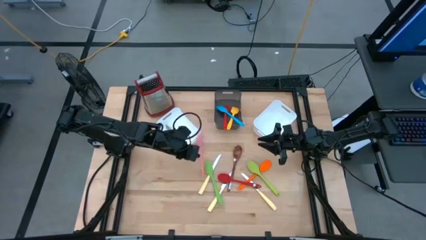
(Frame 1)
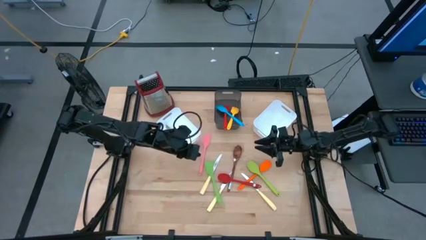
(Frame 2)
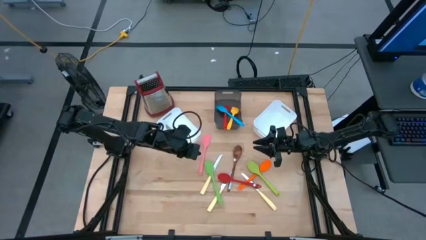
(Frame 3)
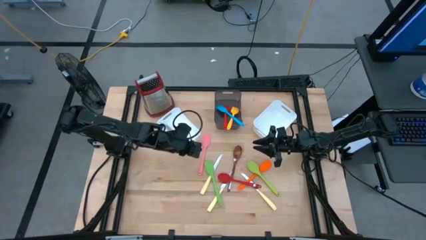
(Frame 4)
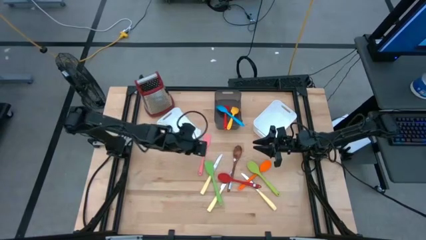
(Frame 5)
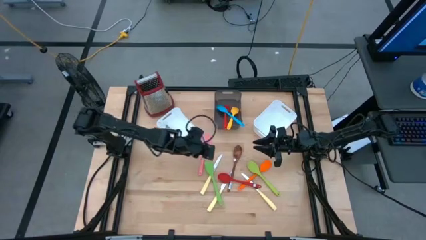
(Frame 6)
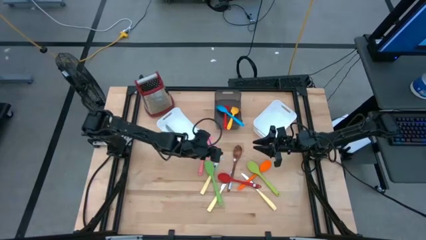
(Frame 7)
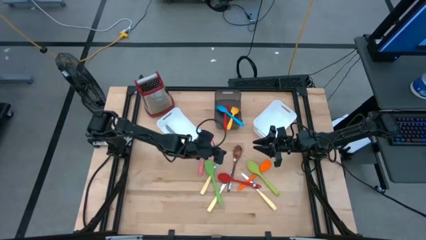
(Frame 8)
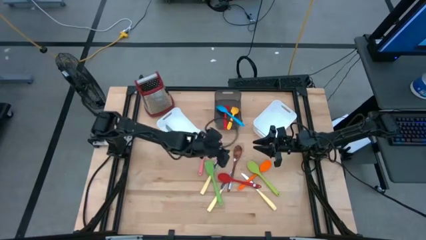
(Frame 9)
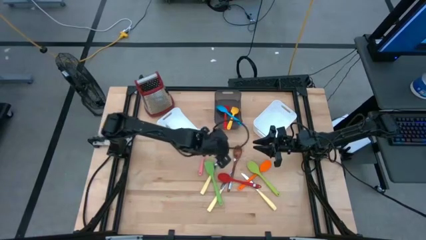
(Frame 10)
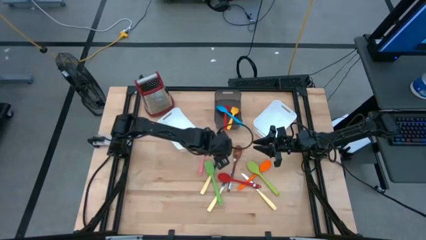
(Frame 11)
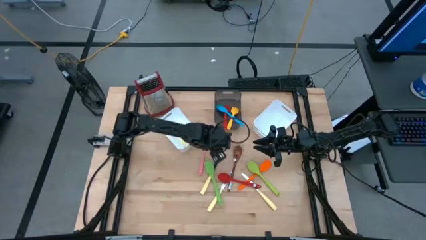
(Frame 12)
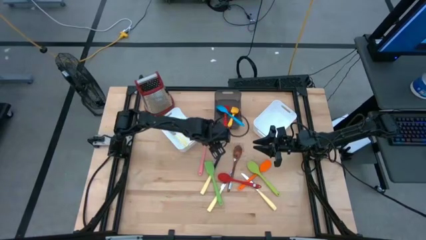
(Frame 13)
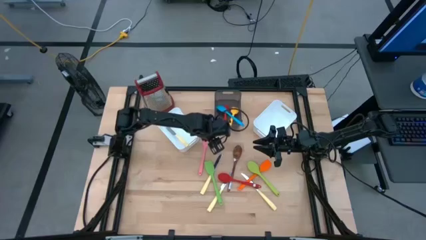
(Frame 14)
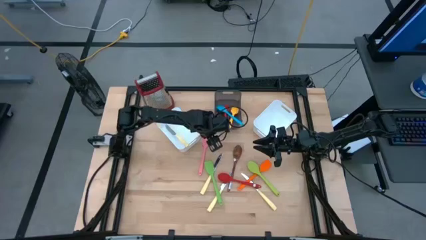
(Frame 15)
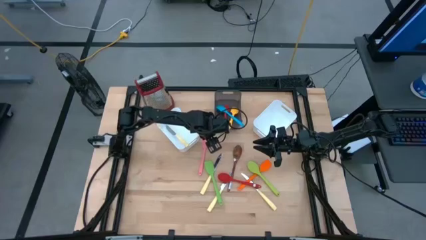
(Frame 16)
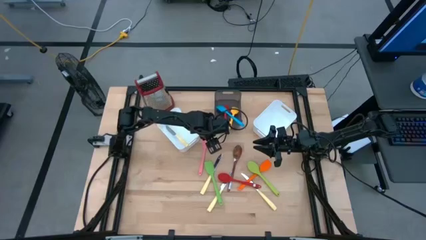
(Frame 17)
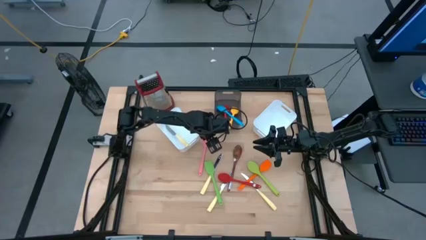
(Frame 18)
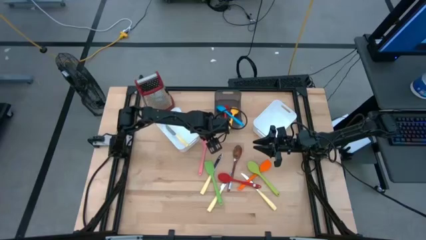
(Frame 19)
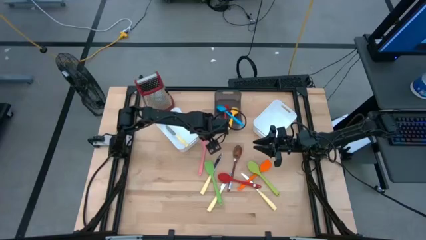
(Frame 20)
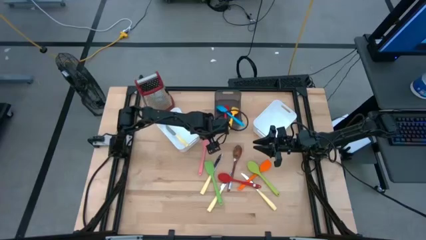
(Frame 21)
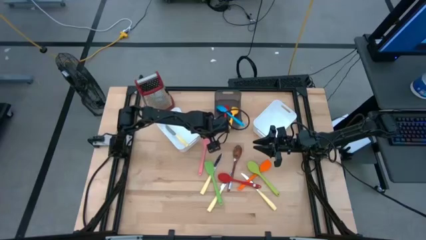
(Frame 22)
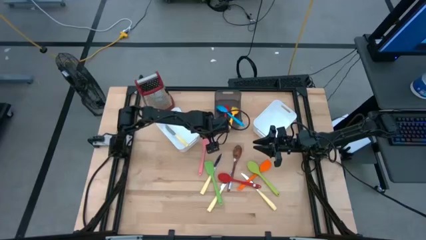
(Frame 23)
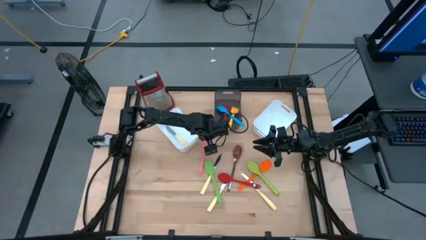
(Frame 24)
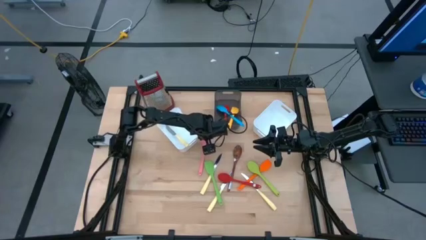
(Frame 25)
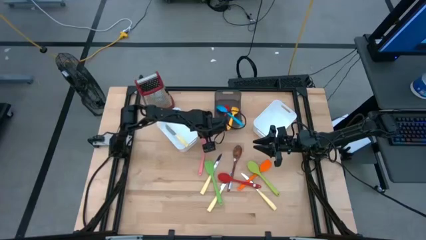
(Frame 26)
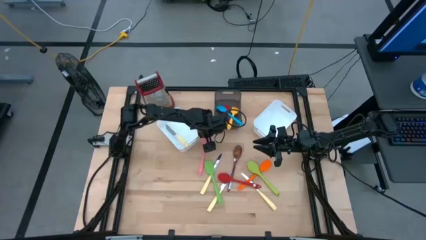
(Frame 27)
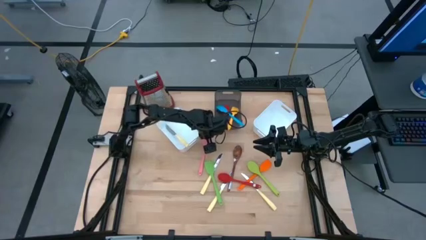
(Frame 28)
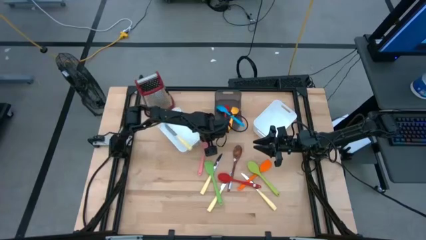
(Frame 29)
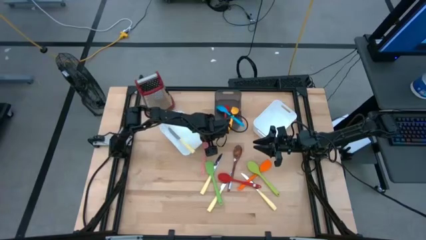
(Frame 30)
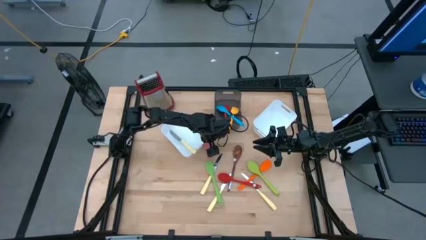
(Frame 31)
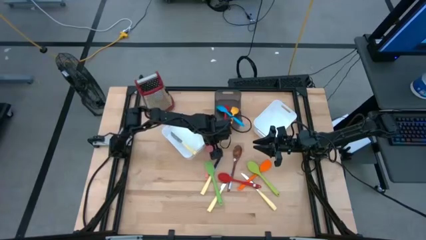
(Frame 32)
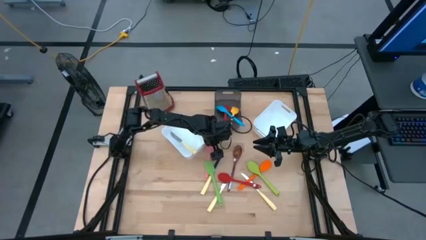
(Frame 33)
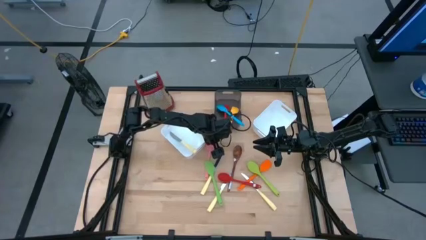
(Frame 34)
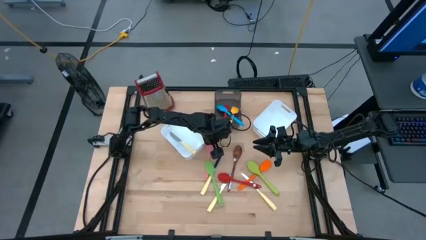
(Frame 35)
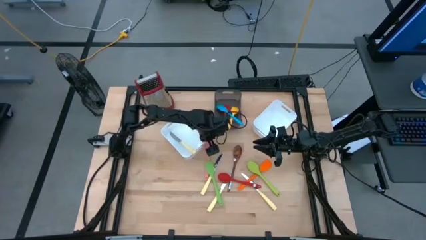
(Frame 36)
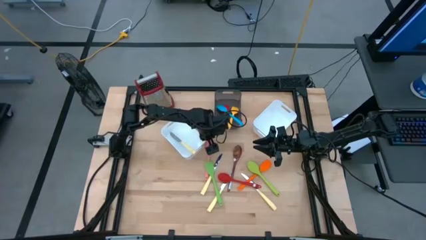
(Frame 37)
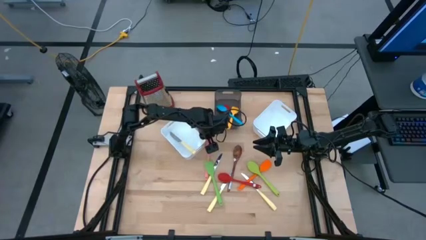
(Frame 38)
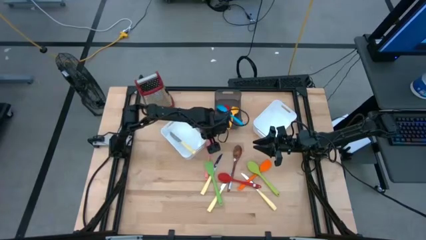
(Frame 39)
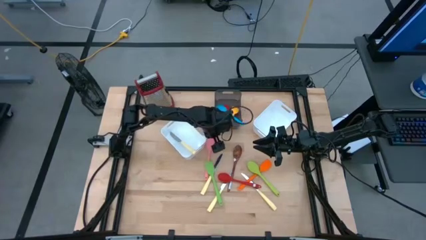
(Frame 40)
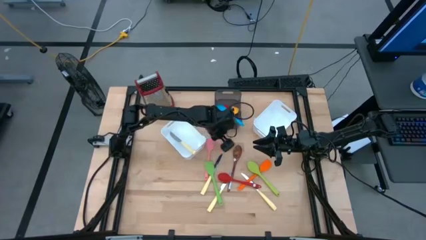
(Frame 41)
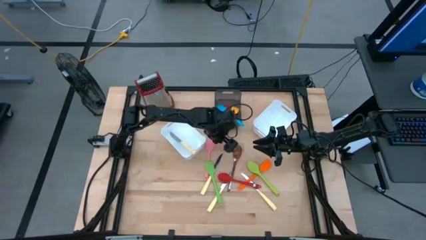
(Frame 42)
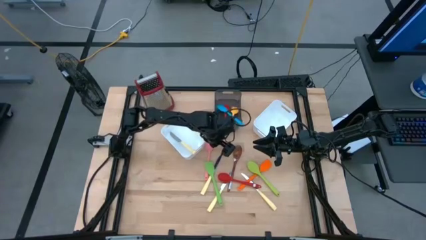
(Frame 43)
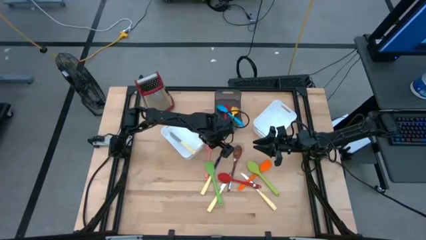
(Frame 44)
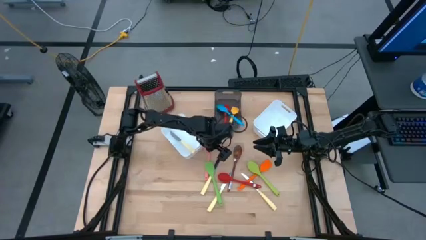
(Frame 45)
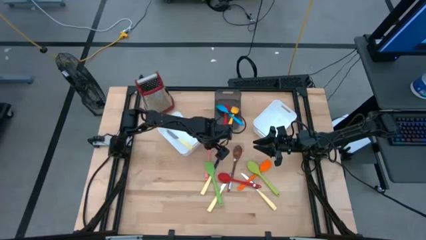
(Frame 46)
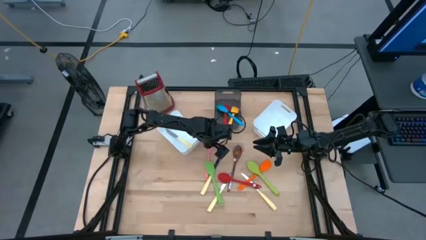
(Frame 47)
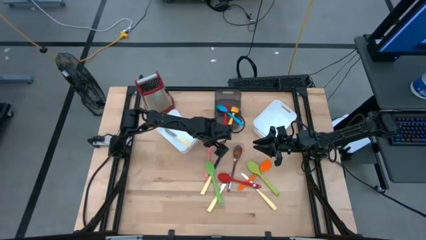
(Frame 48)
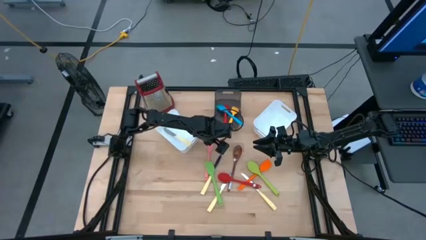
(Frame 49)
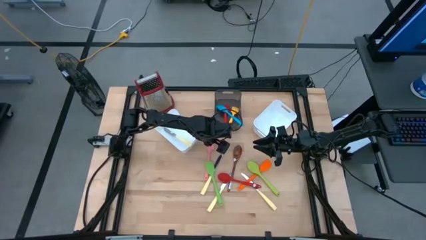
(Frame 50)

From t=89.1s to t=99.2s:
Task: Pick & Place Kitchen Items
Put the pink spatula into the black bin

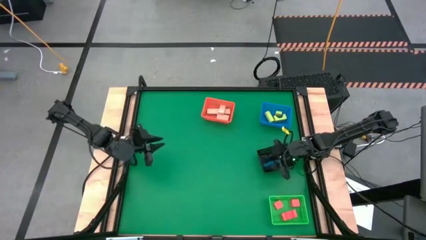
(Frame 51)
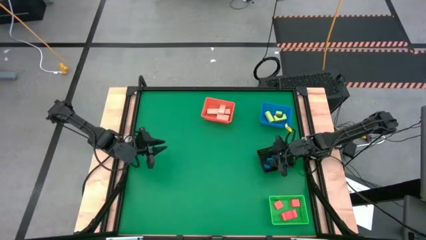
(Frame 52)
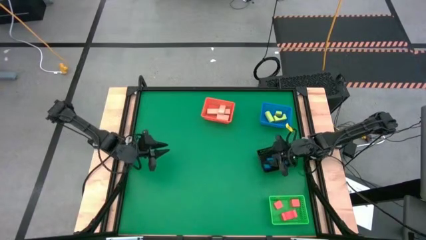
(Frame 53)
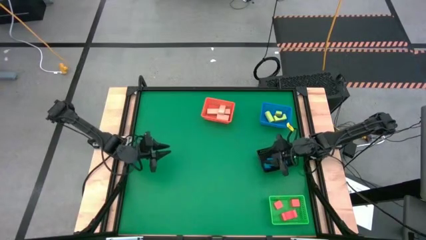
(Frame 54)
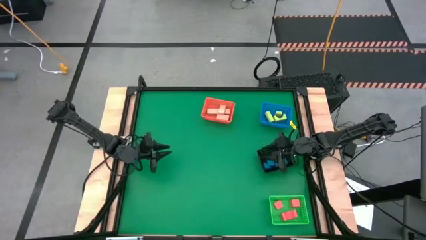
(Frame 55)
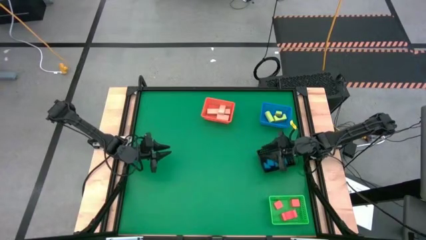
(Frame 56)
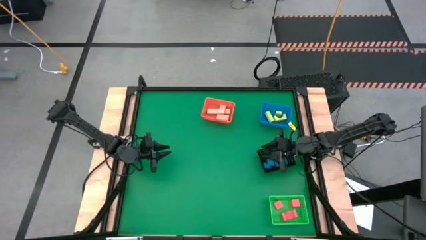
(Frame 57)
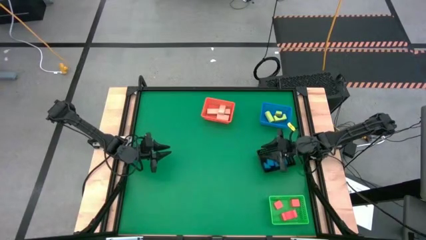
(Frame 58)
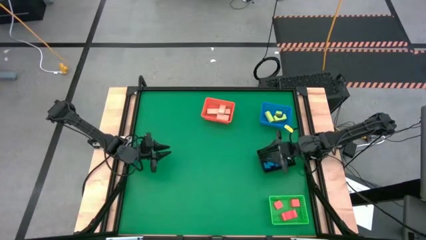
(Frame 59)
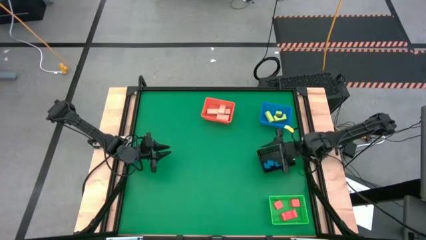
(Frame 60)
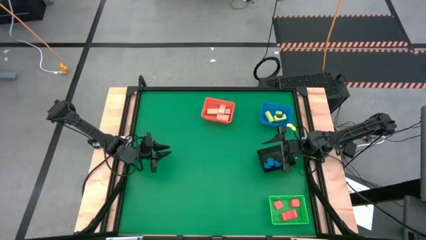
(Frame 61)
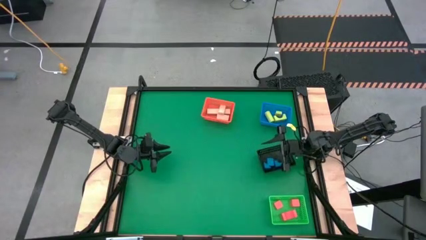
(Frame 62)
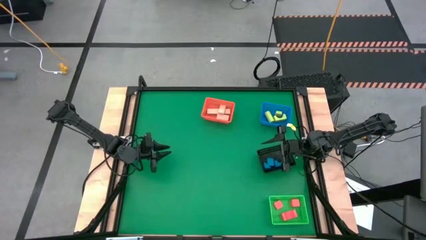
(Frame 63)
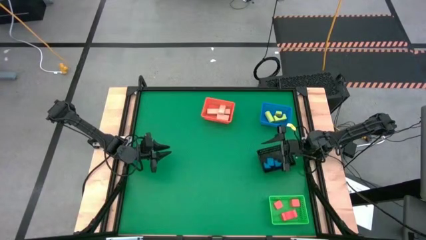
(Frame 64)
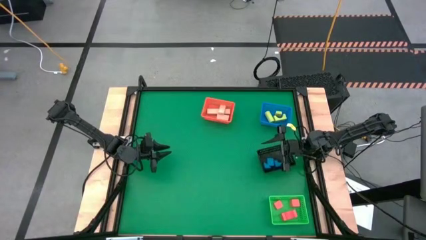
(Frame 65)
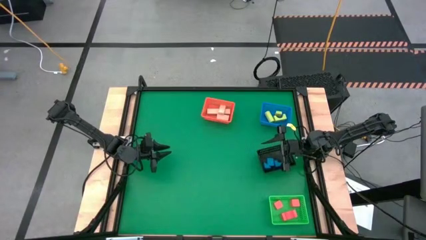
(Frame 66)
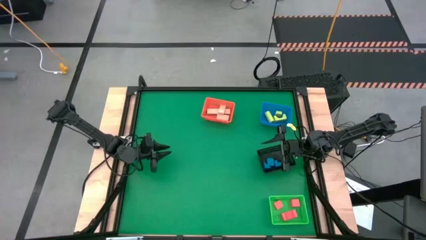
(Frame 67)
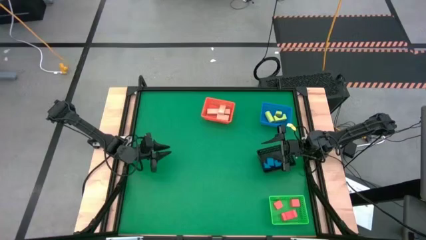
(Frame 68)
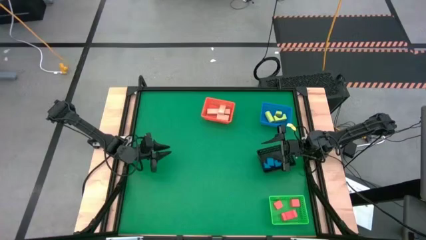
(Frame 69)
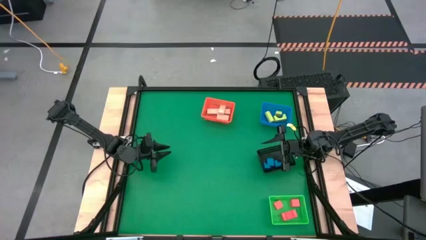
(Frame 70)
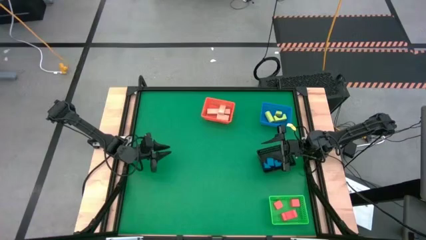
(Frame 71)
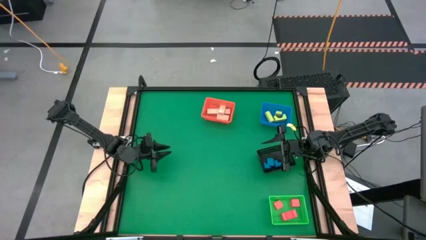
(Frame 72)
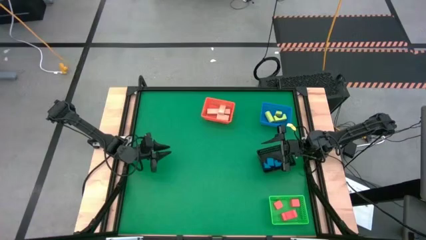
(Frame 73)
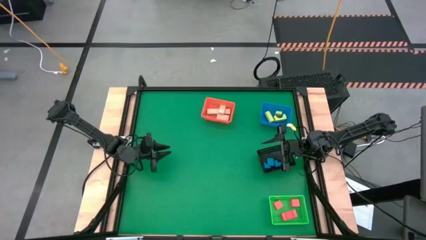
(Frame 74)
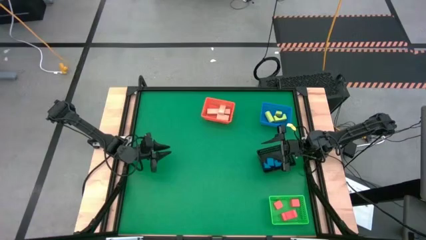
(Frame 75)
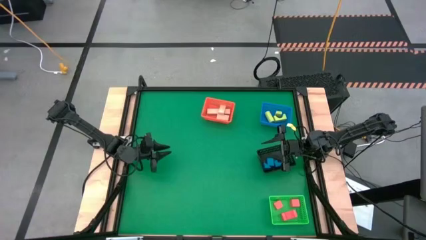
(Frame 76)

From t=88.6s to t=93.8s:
Task: Sort & place blocks by color
Return to Home Position
